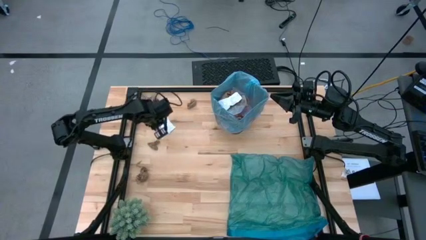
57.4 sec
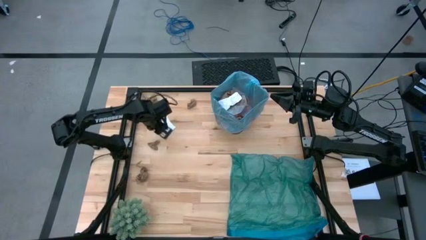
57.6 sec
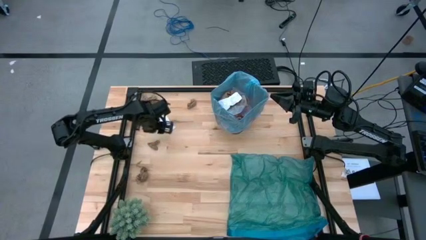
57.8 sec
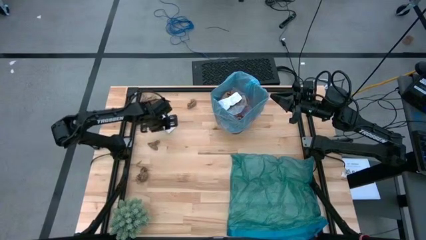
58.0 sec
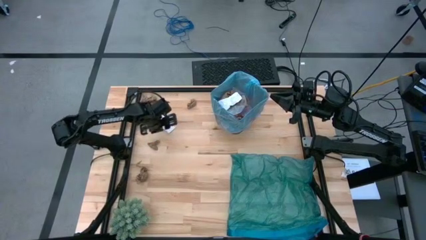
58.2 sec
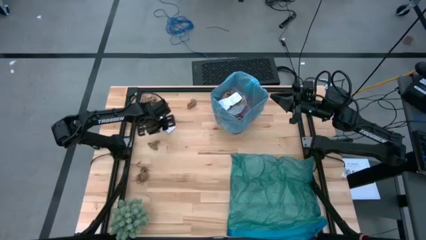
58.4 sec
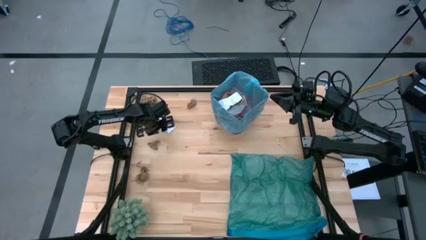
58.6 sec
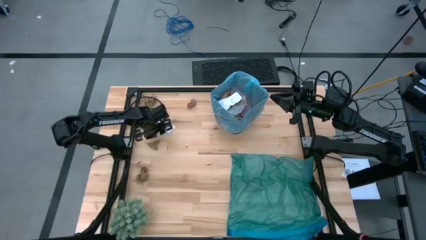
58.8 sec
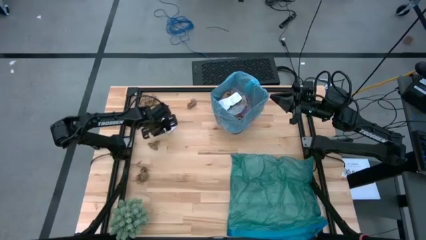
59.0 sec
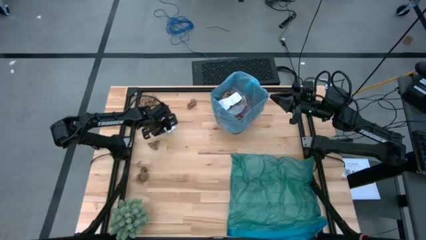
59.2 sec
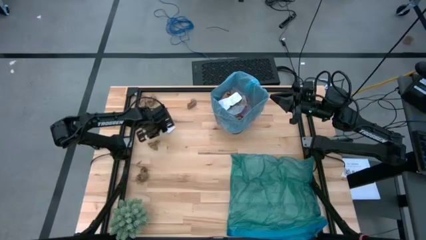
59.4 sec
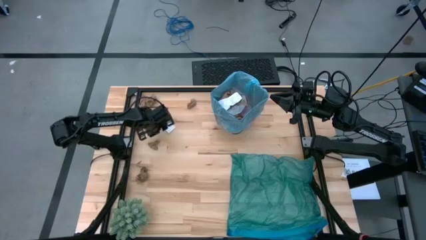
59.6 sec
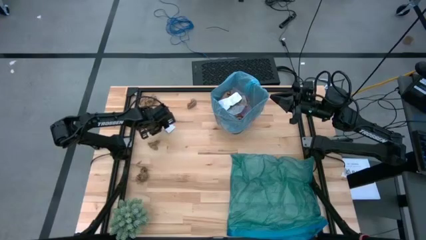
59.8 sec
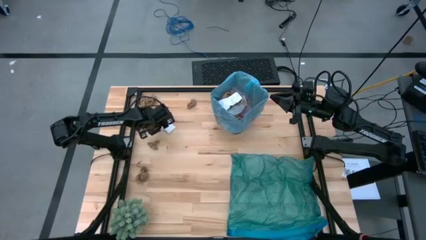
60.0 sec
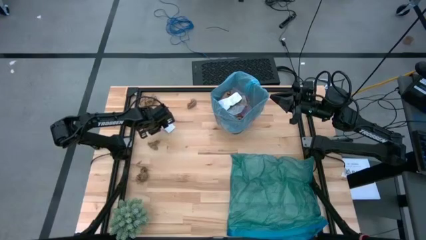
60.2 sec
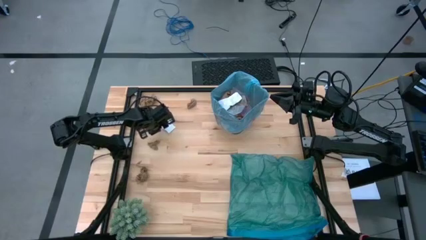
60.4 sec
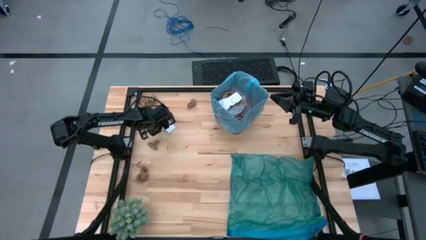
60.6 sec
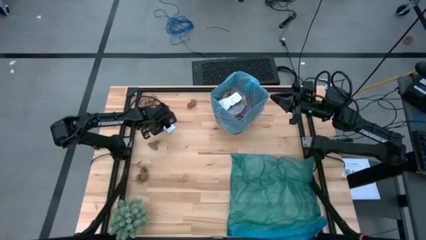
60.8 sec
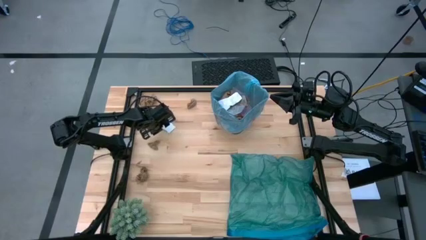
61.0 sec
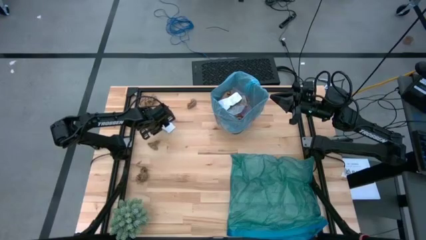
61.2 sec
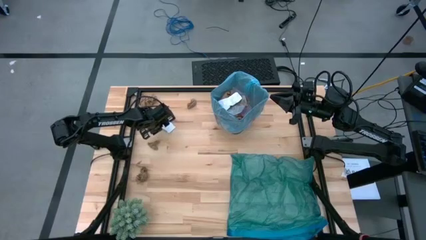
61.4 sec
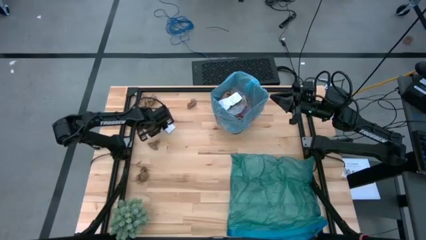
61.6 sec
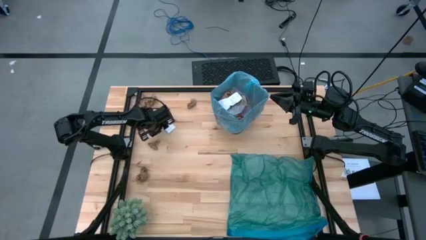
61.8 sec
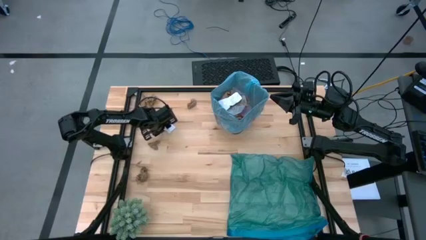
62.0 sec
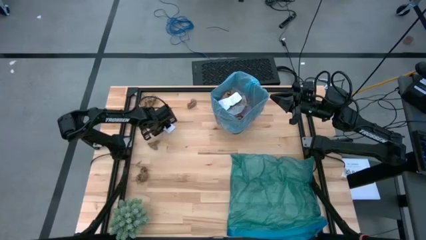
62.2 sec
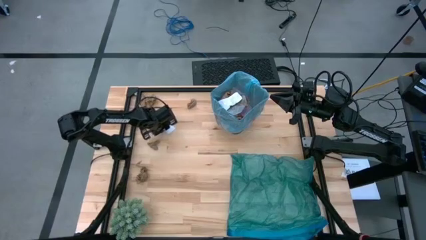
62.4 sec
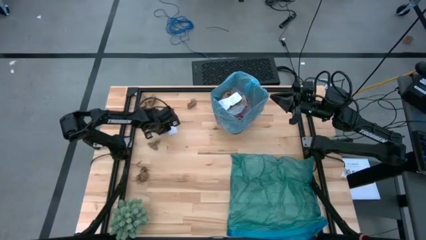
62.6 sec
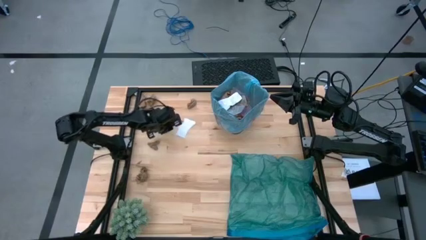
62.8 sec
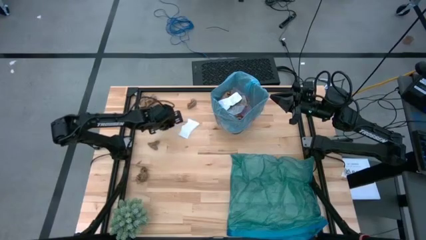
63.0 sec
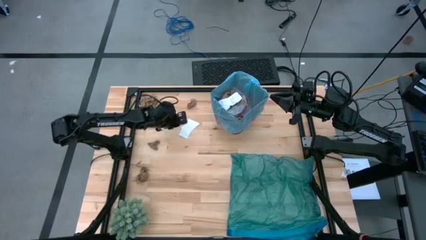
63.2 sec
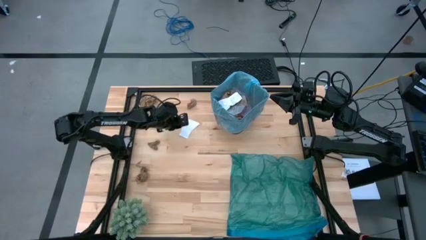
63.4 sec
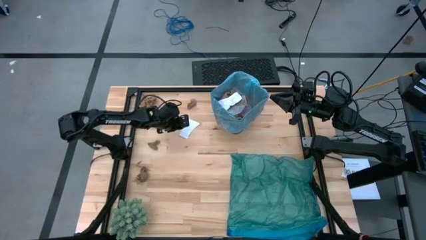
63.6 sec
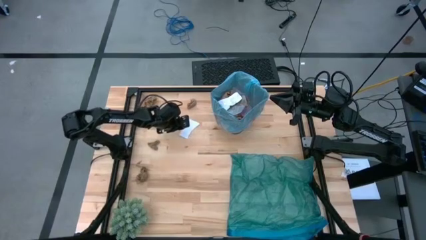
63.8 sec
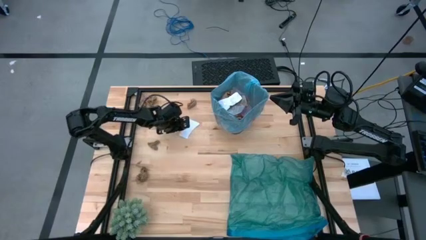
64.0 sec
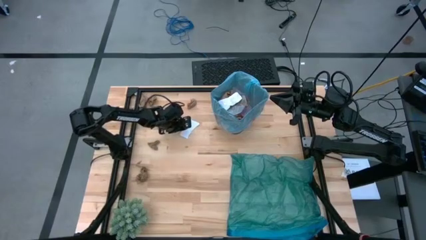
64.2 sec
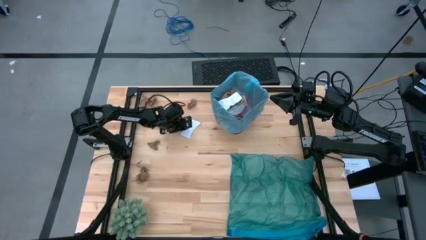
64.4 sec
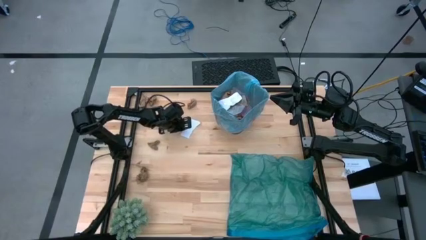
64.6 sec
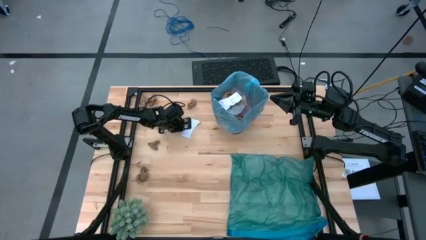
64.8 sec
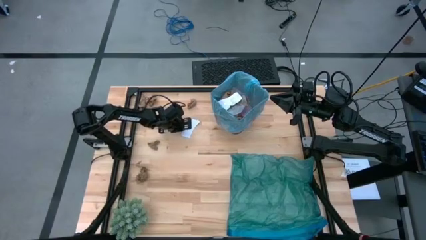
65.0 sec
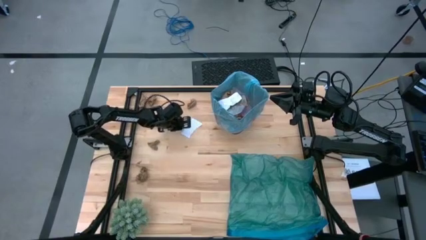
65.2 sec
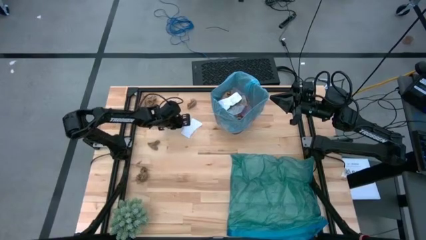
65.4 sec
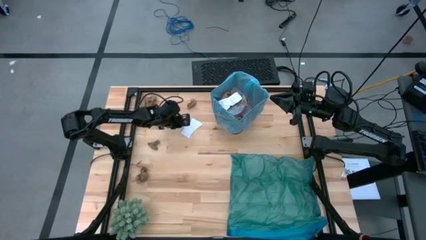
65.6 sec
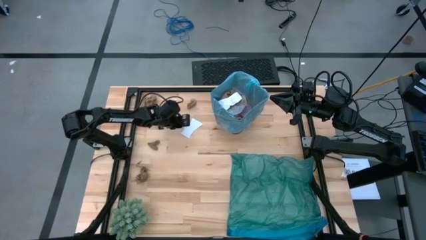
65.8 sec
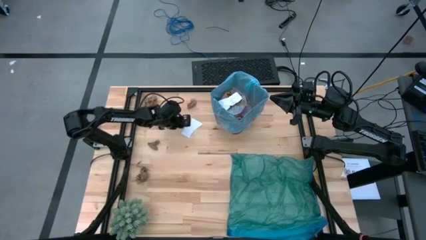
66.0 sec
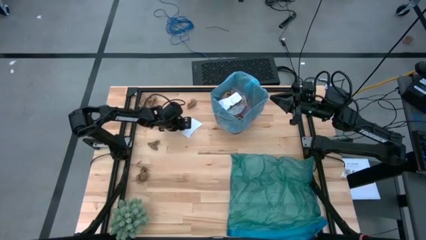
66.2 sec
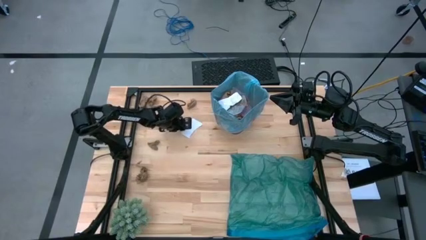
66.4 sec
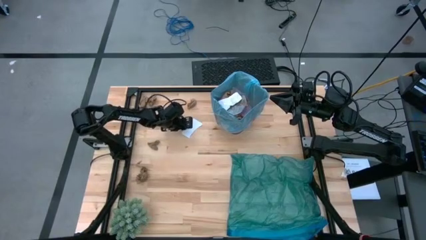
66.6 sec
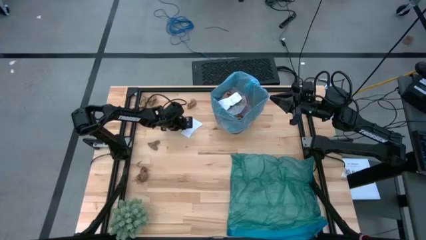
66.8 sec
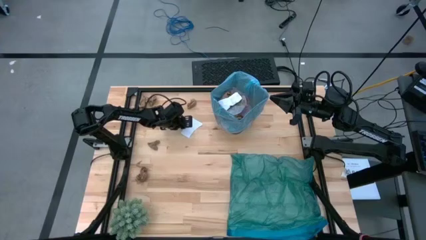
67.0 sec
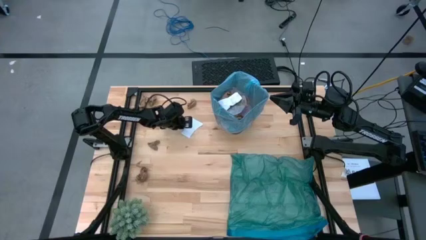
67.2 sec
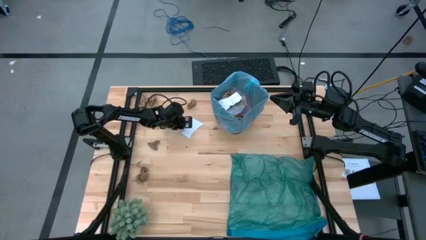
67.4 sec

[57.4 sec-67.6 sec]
Task: place trash/remove bag and relplace
Put the white paper into the black trash bin

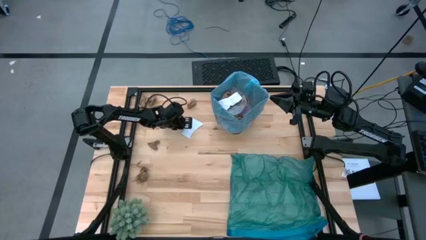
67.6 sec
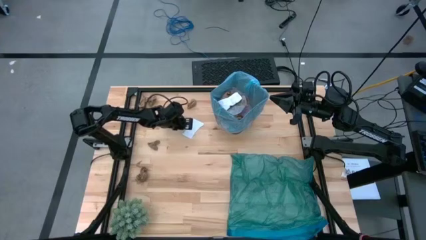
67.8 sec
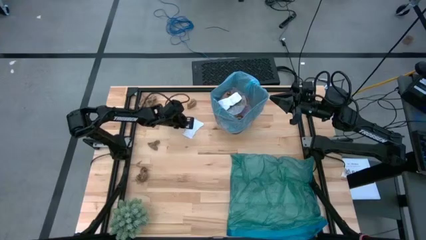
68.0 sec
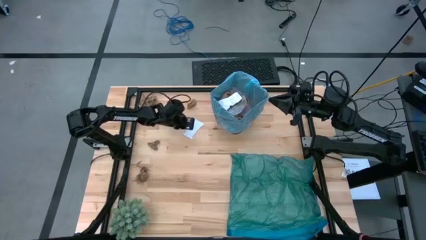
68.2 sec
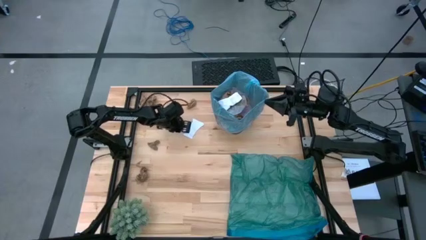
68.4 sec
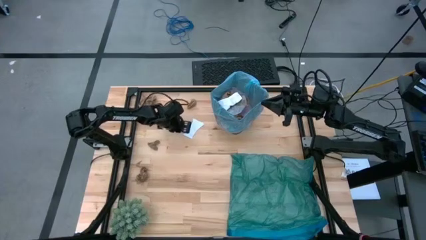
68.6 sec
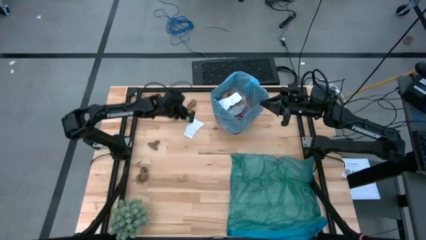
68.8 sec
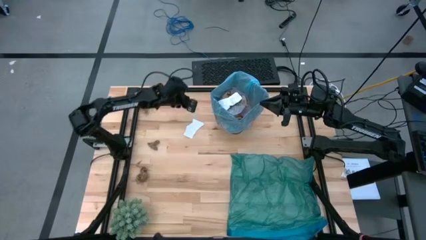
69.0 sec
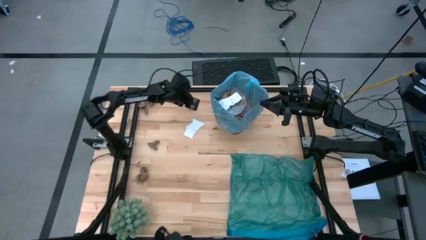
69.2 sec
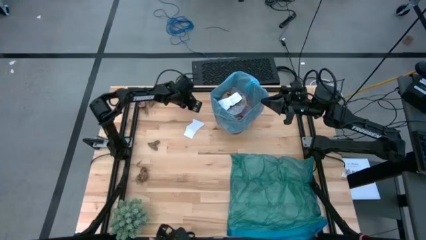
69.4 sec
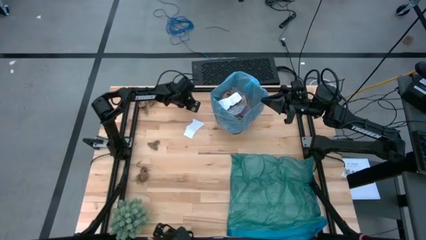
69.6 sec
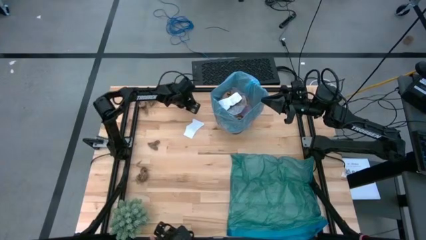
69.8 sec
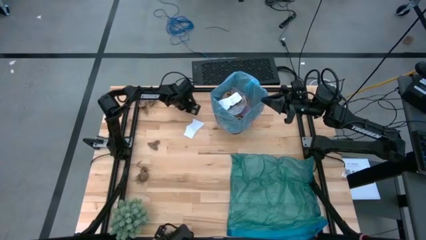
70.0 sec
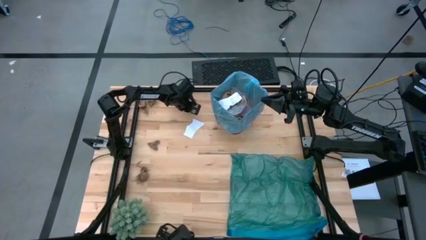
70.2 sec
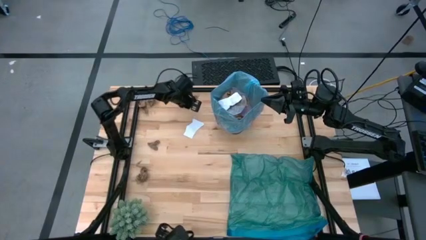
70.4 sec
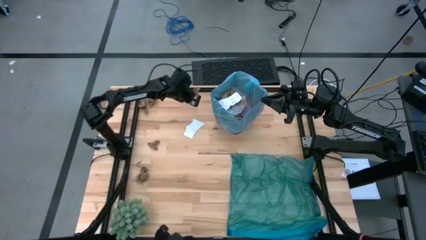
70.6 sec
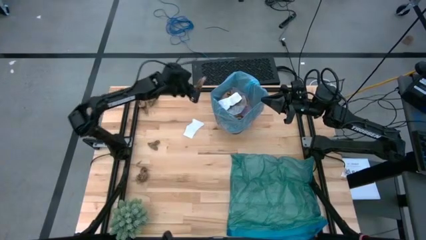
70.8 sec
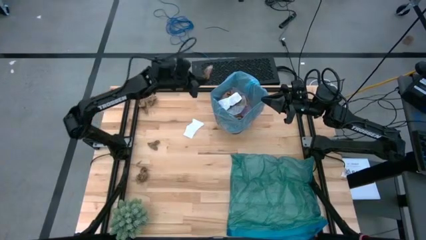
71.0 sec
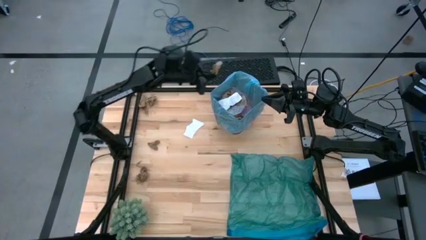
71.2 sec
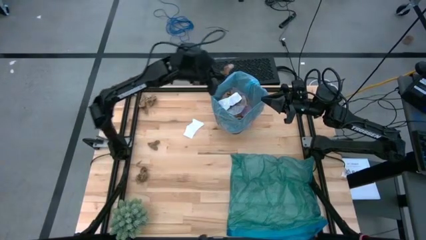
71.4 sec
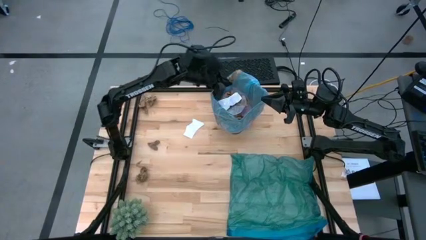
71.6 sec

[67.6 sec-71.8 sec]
Put the brown napkin into the black trash bin

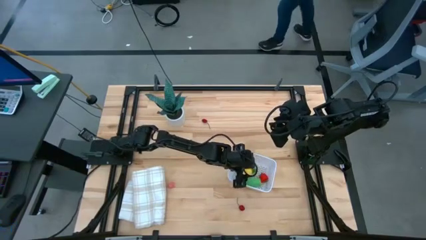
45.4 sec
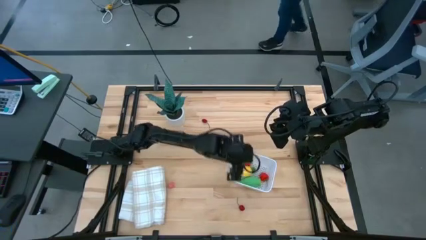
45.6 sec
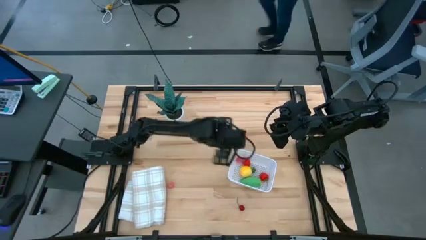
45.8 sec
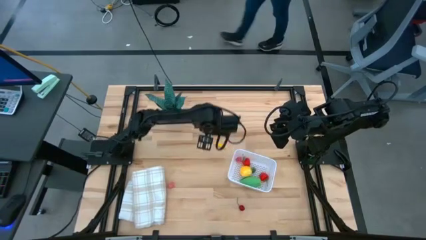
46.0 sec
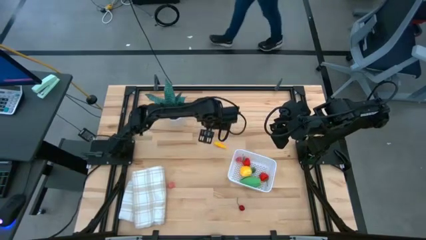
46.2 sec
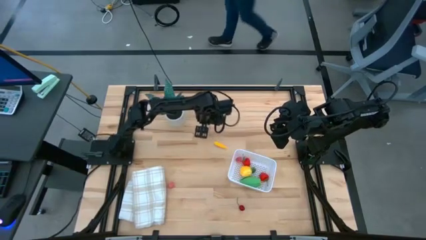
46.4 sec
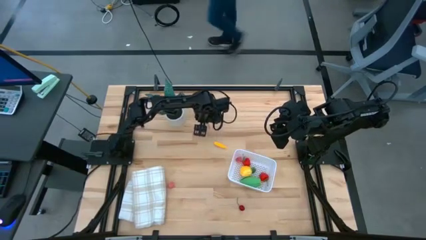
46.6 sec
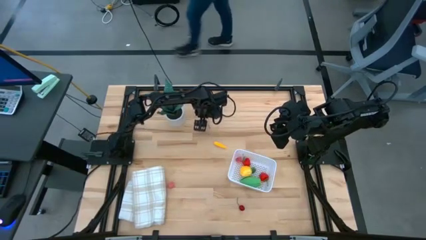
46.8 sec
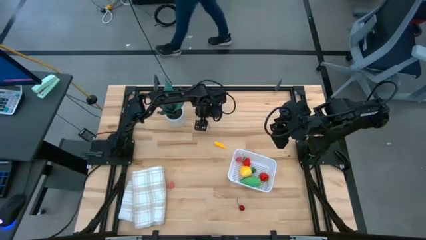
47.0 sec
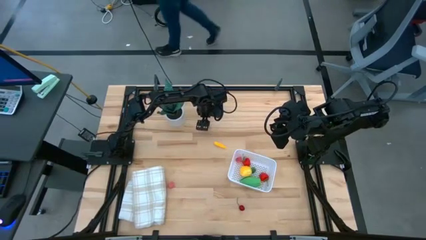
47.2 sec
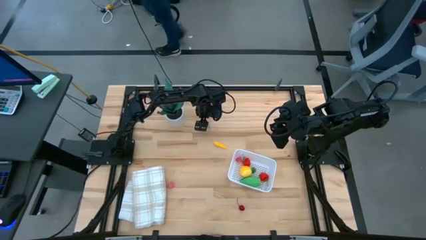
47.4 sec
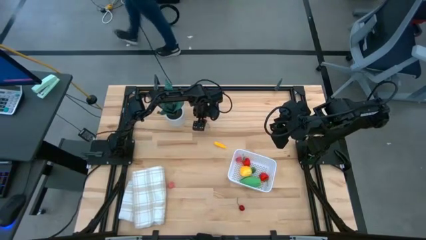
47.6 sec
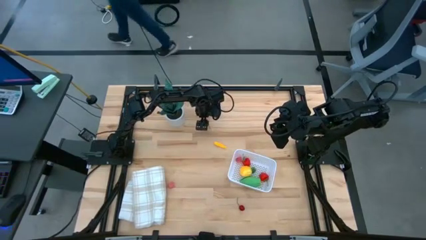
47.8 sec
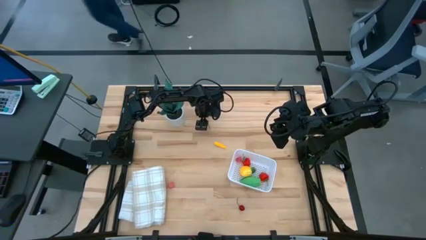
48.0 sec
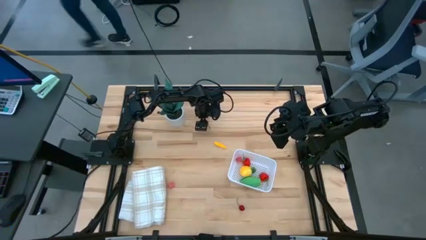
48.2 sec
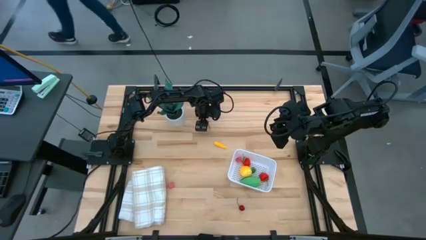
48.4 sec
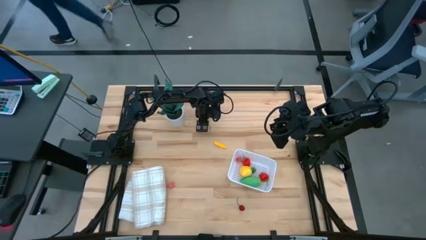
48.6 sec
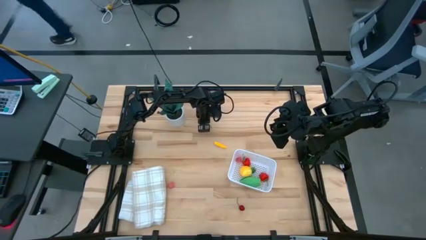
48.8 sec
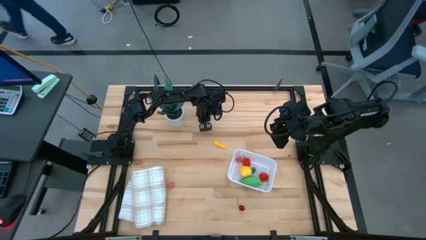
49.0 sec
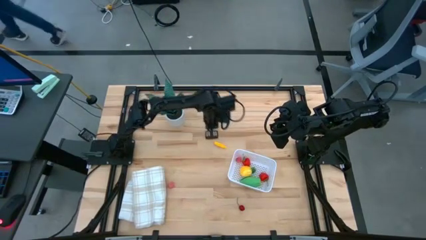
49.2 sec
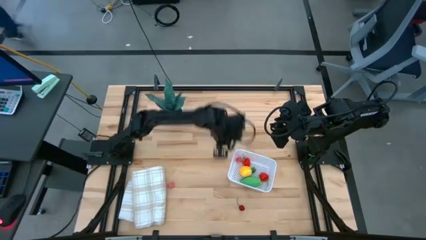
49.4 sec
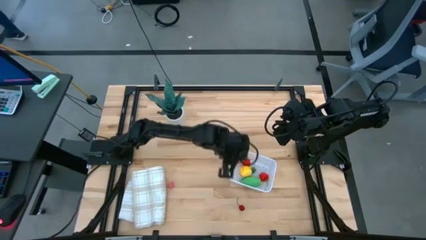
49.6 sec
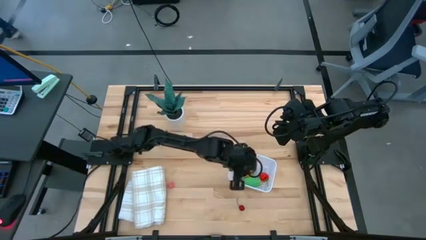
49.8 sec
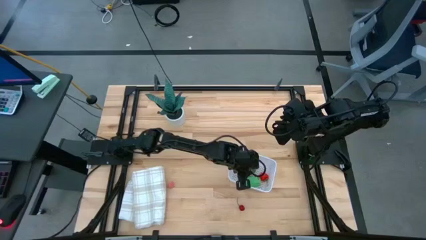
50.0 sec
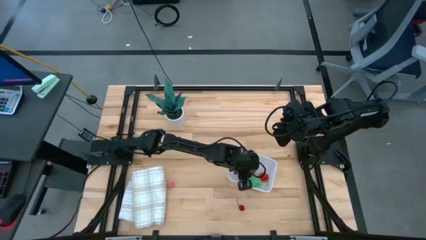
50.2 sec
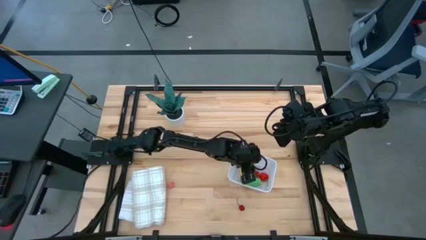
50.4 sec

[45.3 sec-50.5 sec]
Task: Pick and placing Produce into tupperware
Put the top red cherry into the white basket
